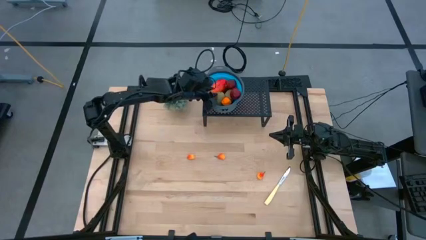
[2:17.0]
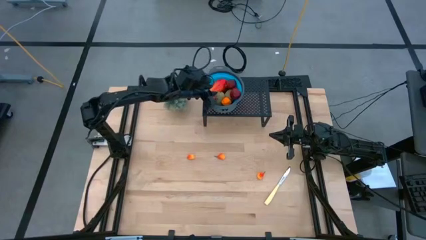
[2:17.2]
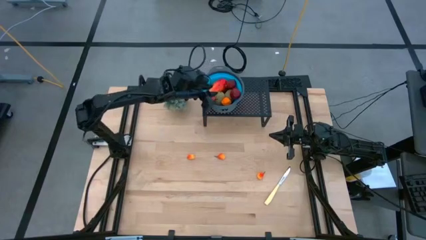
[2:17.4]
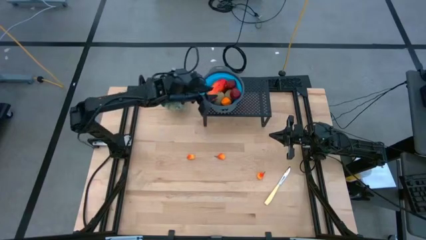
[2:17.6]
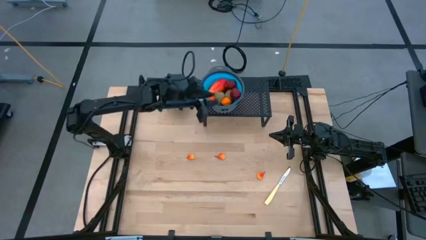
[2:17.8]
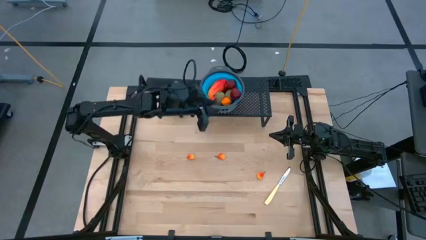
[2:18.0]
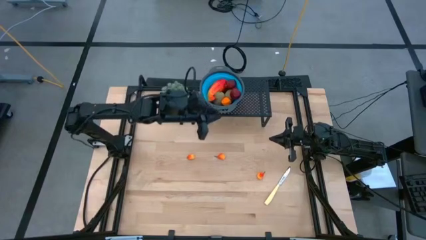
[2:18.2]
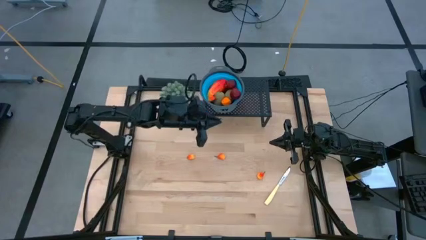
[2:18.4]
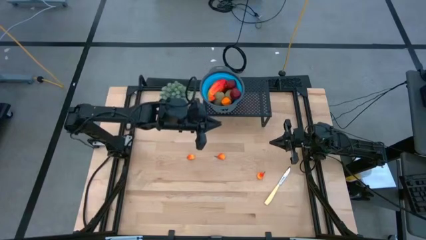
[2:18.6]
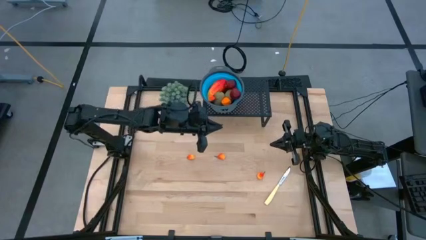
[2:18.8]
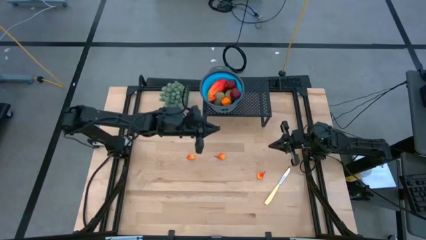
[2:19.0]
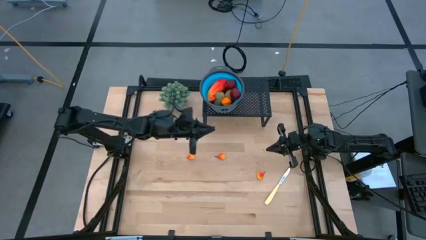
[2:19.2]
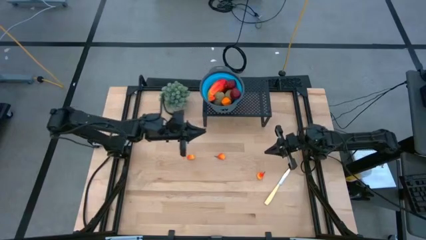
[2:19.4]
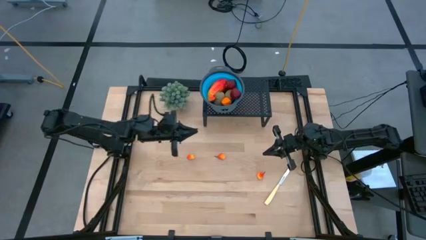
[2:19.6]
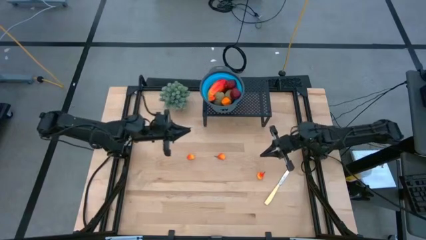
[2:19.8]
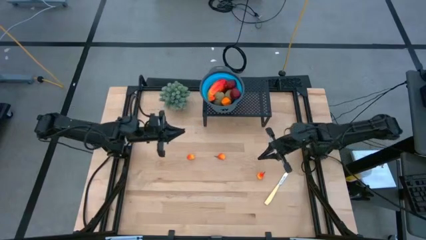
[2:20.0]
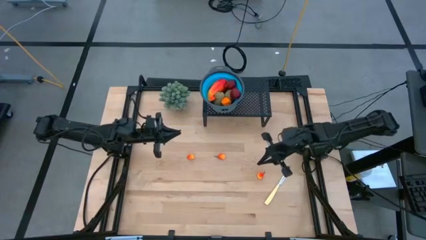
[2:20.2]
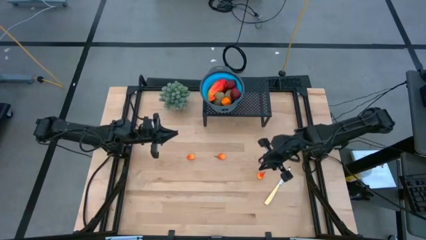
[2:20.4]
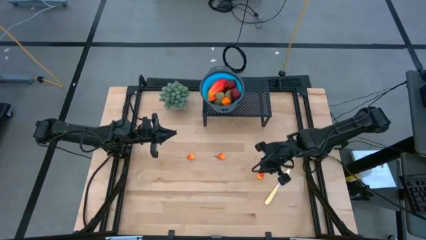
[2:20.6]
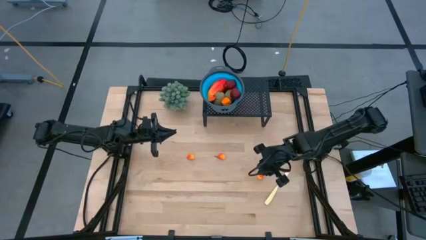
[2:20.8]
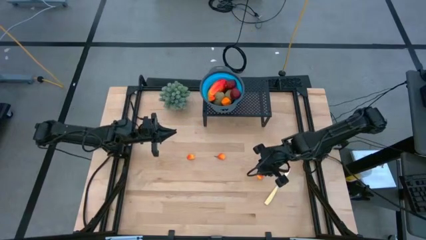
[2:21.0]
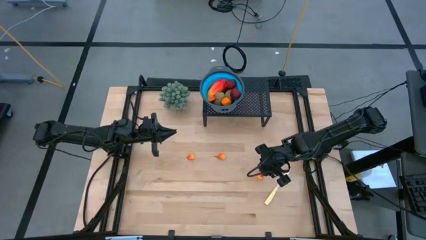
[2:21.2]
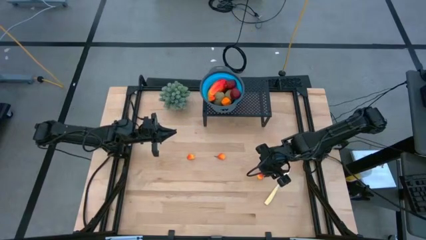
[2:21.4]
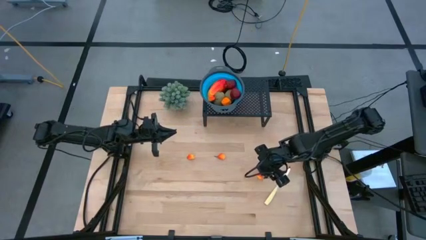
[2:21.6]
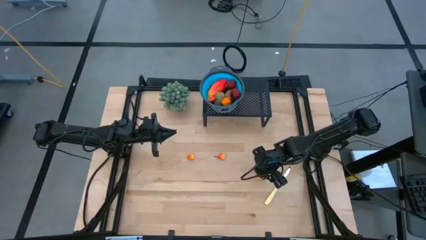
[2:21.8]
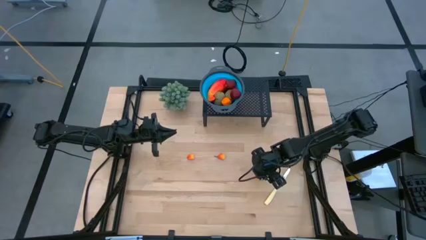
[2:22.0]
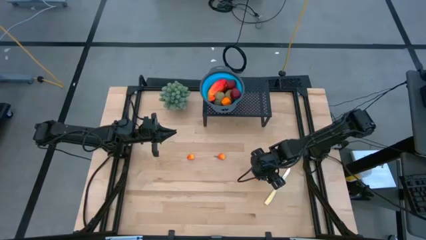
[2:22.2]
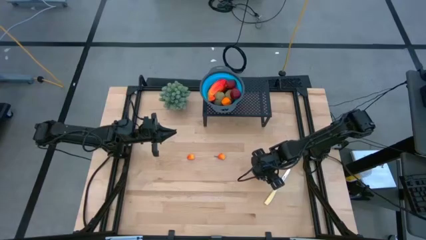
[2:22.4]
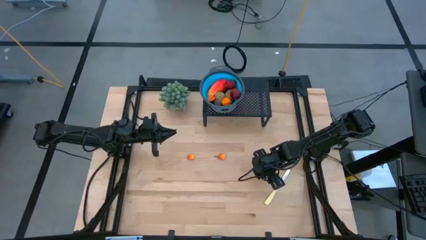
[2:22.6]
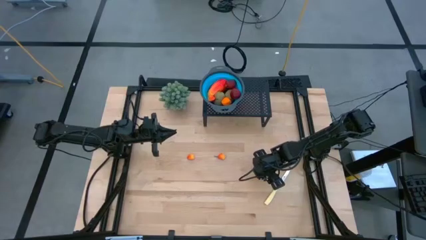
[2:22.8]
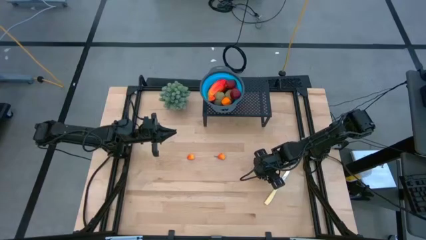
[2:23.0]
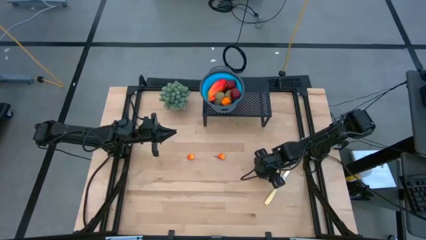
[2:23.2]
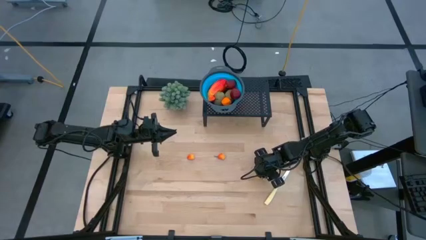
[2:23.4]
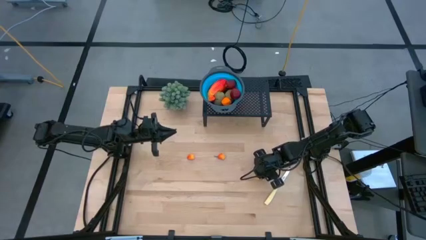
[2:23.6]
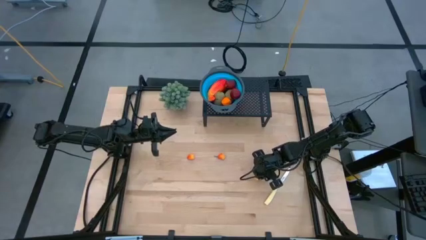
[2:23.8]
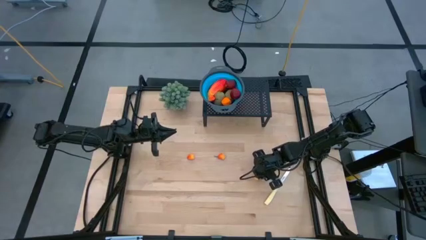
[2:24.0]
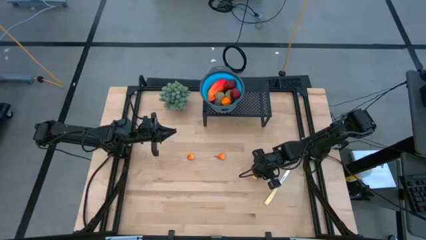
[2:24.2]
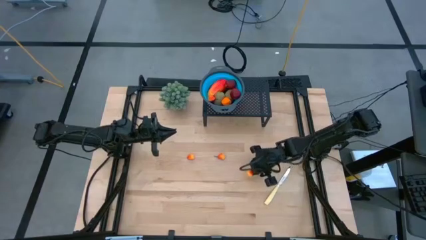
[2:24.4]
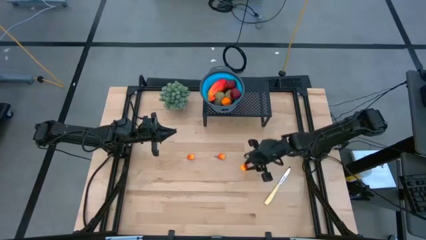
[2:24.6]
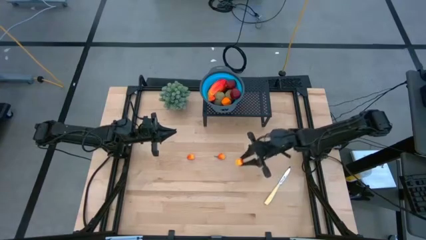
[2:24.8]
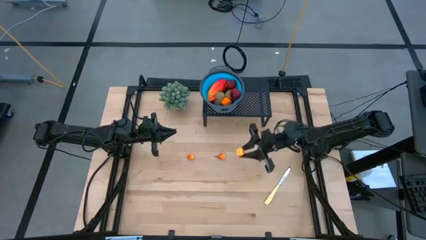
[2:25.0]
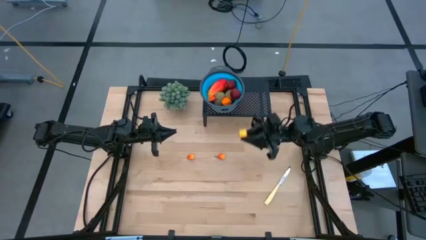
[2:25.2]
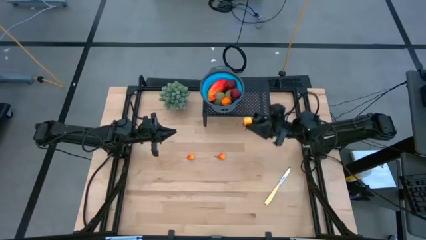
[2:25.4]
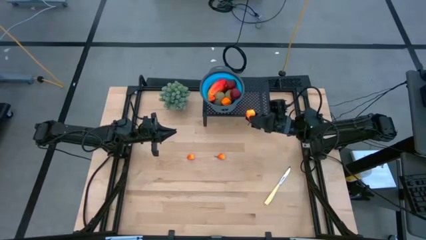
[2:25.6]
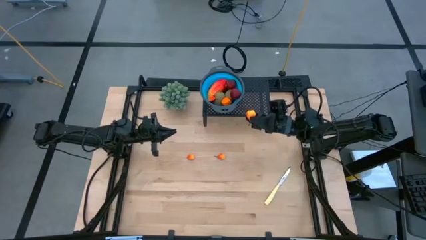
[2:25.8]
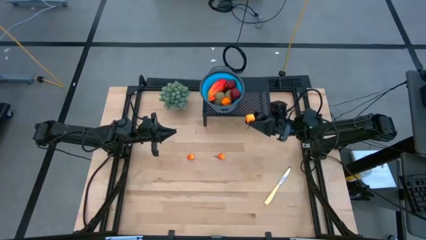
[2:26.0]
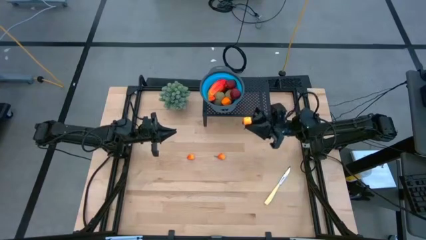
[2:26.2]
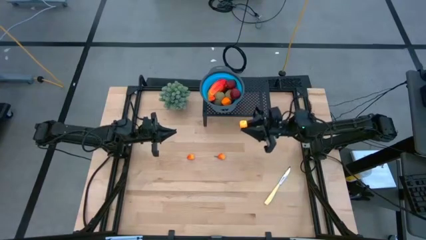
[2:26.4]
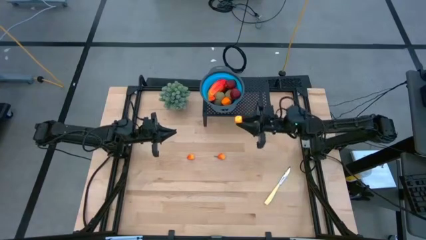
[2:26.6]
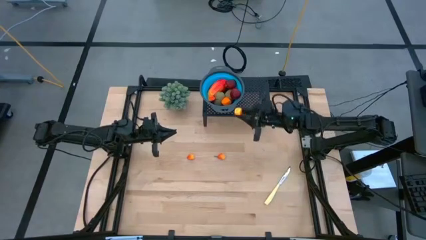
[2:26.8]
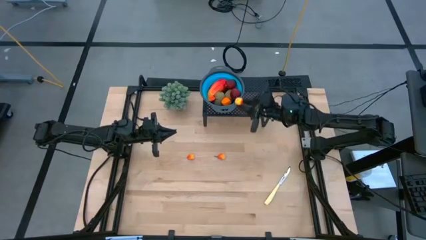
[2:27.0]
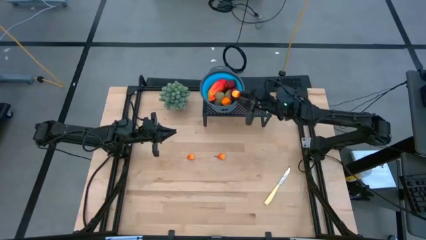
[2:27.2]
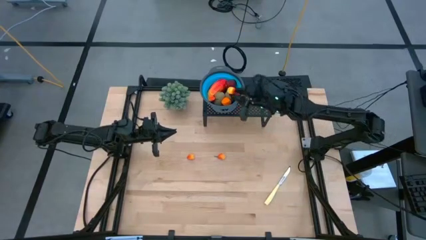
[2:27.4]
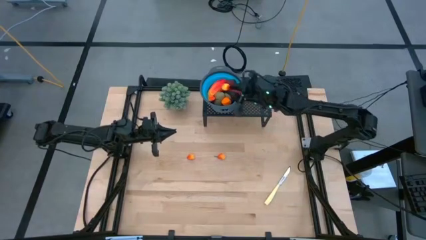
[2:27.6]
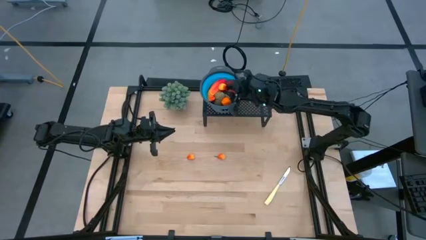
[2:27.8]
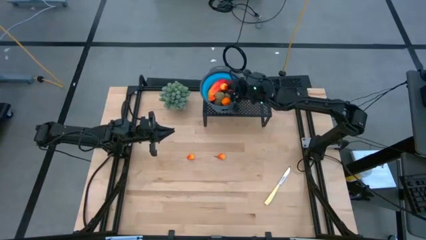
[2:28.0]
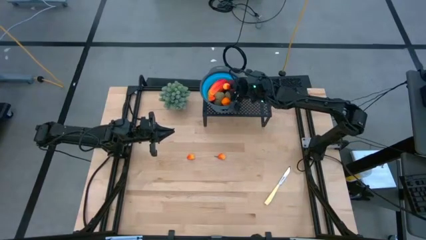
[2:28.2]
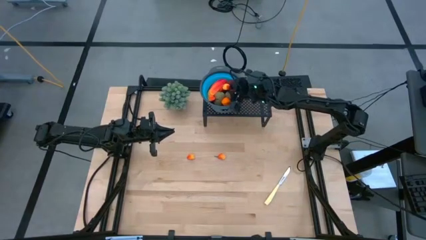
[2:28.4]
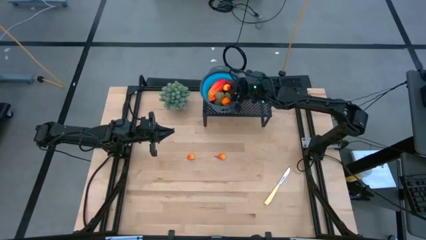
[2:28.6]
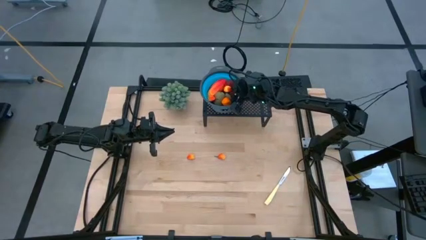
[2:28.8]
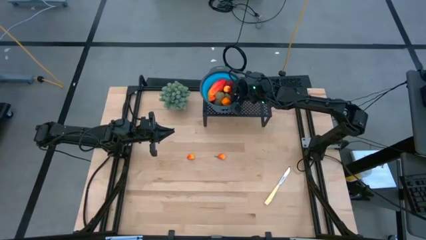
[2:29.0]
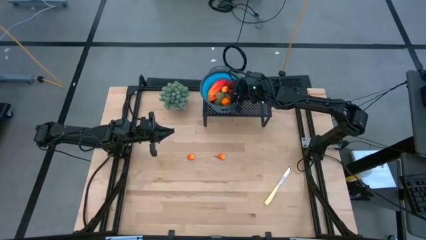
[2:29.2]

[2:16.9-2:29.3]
Task: Pick & Place Fruit
Put the orange peach into the blue strainer bowl on the shelf
